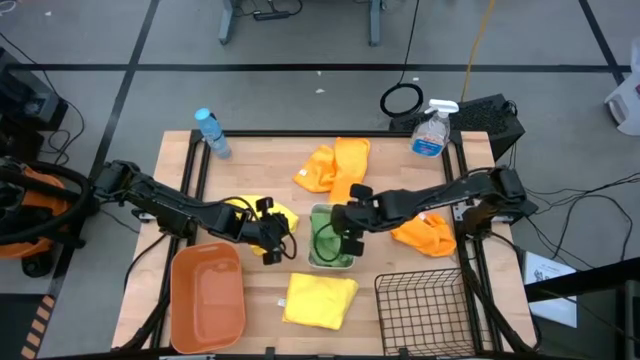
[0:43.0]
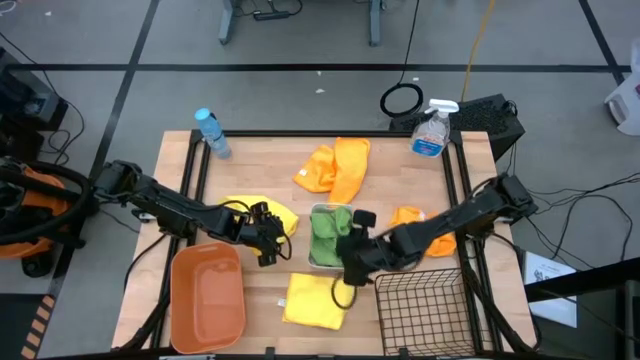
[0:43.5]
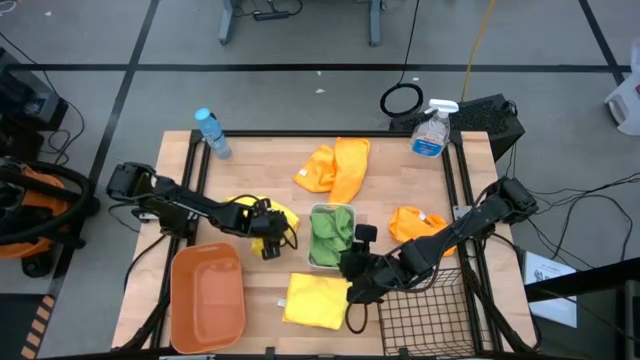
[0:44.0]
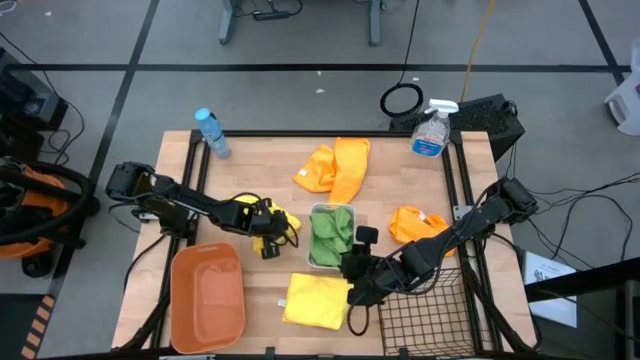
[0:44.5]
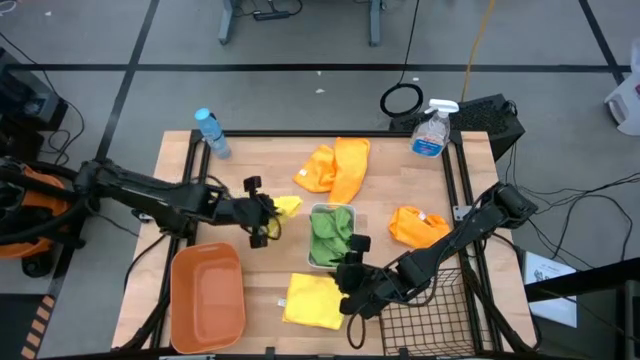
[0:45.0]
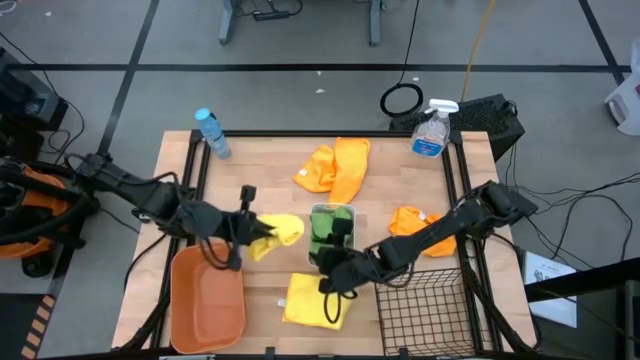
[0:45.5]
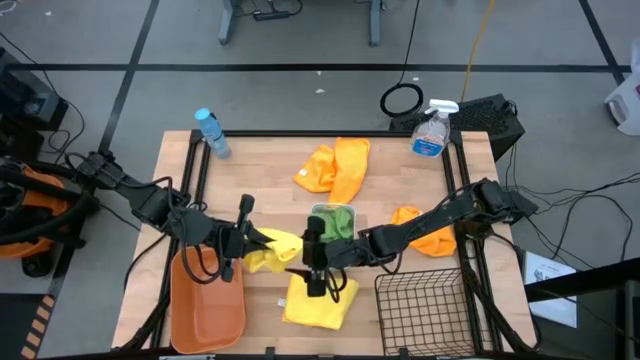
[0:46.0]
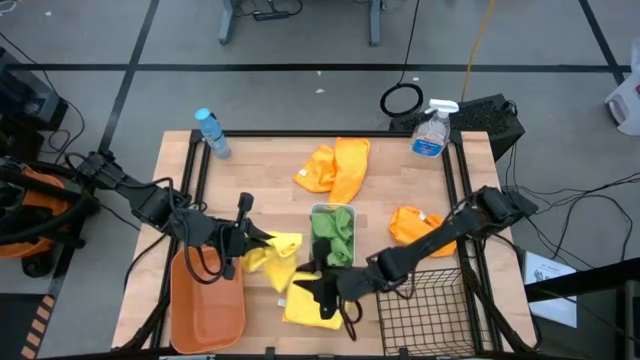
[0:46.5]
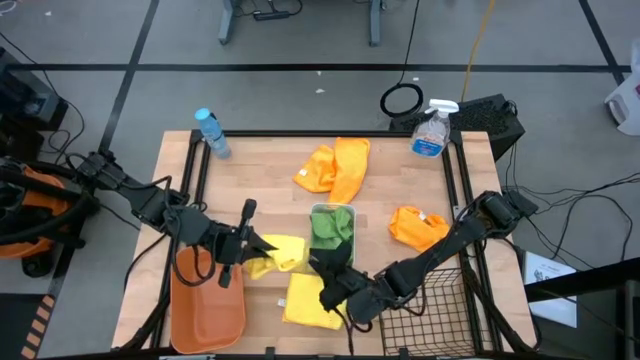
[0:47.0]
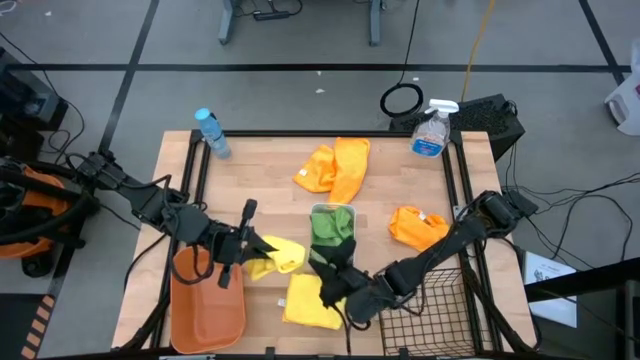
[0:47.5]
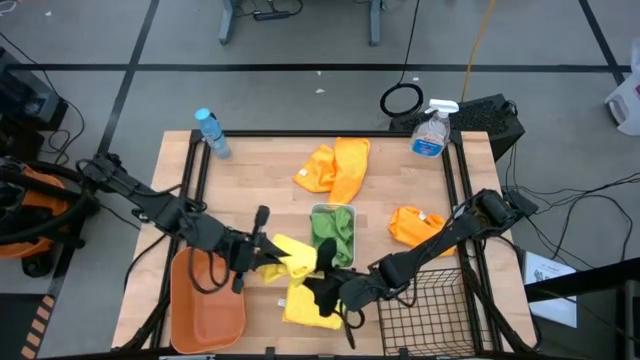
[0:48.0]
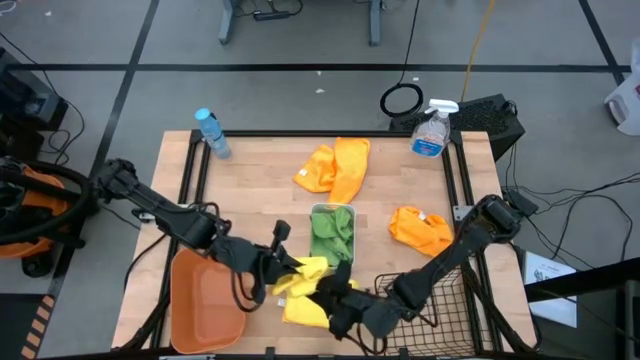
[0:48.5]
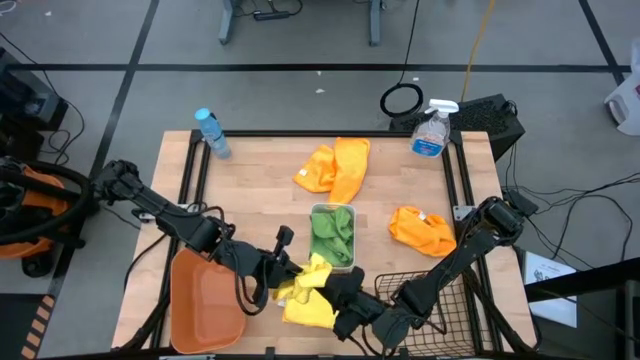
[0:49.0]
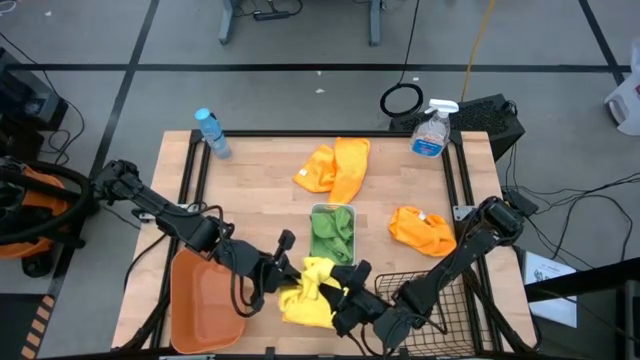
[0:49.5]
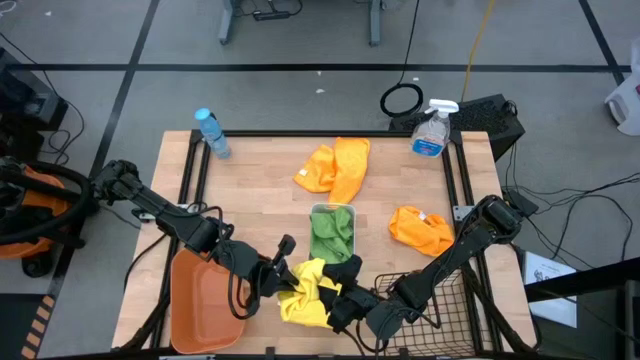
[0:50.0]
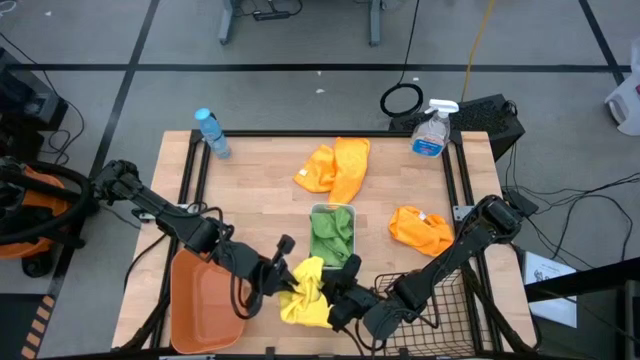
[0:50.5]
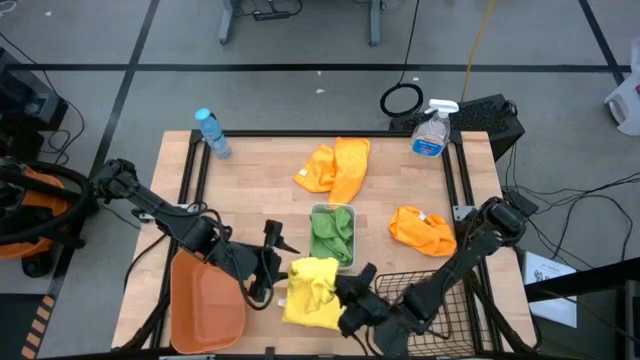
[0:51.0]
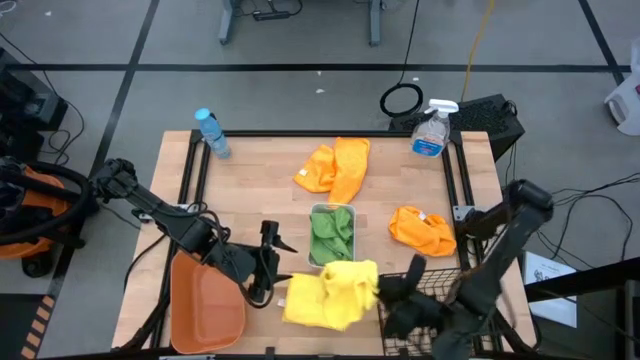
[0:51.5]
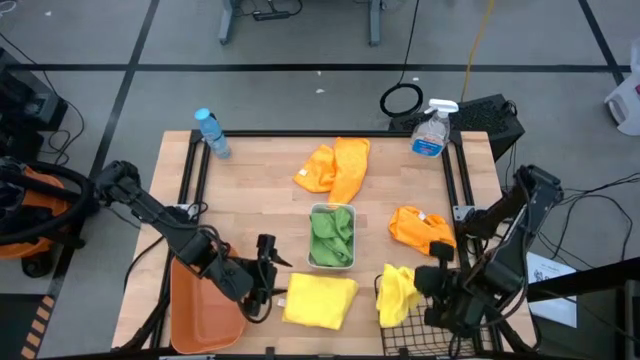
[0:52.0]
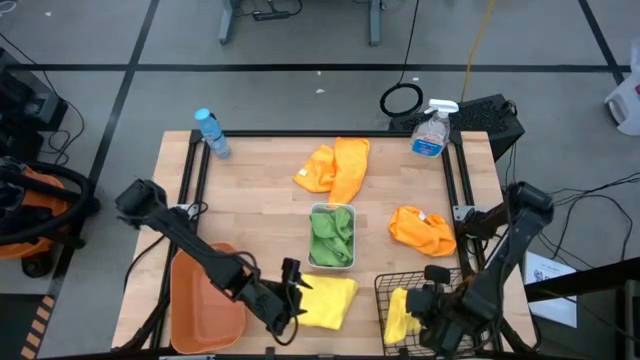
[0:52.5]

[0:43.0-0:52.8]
Task: Sort microfiber towel by color & place in baskets
Put the top yellow microfiber towel into the wire basket

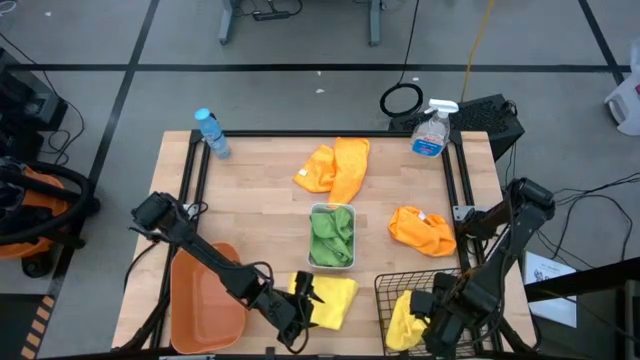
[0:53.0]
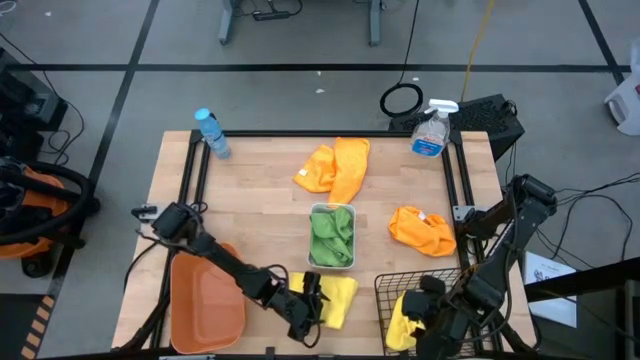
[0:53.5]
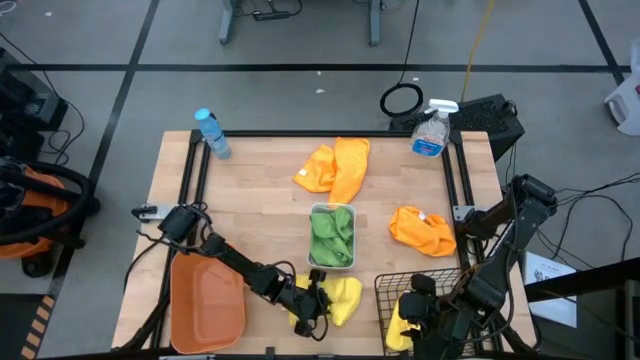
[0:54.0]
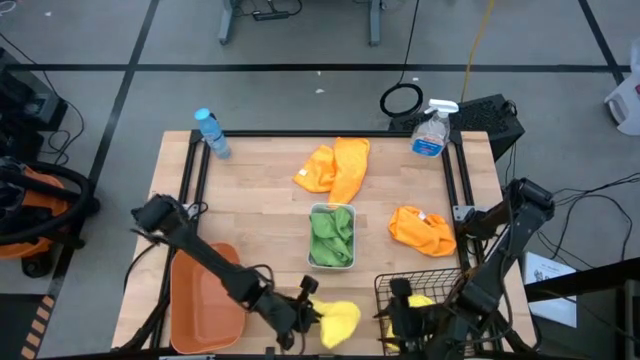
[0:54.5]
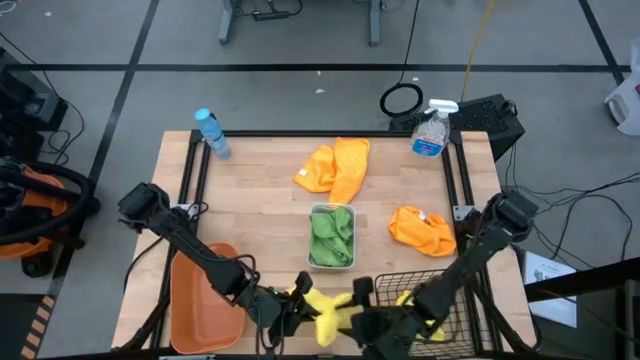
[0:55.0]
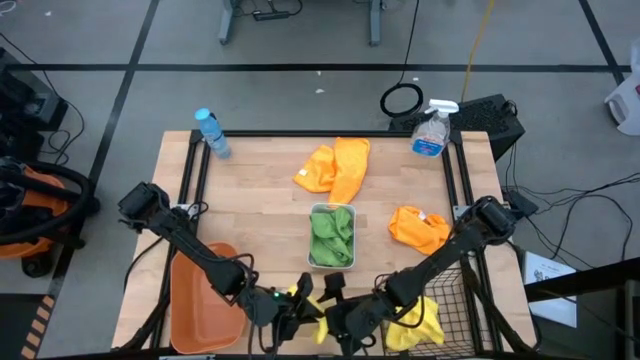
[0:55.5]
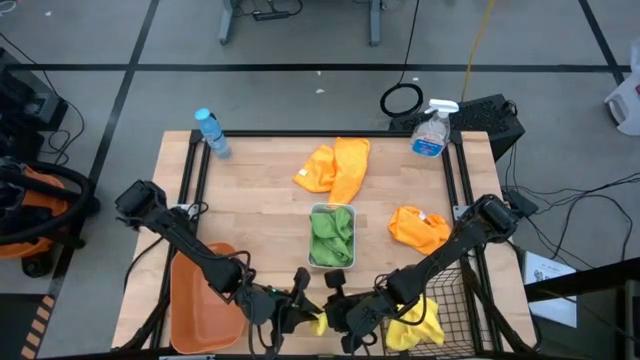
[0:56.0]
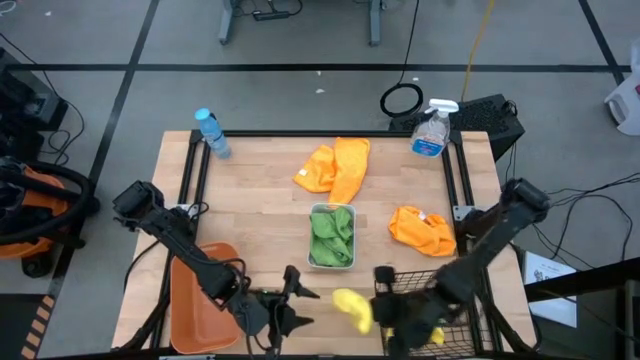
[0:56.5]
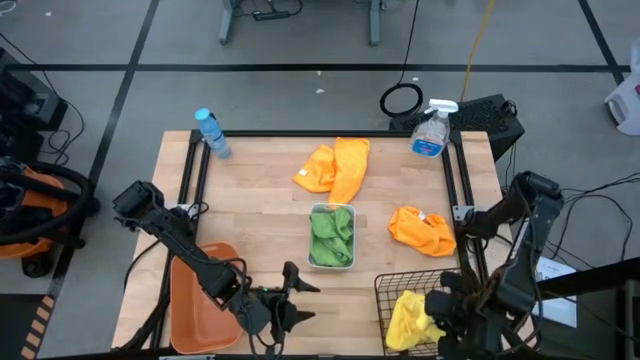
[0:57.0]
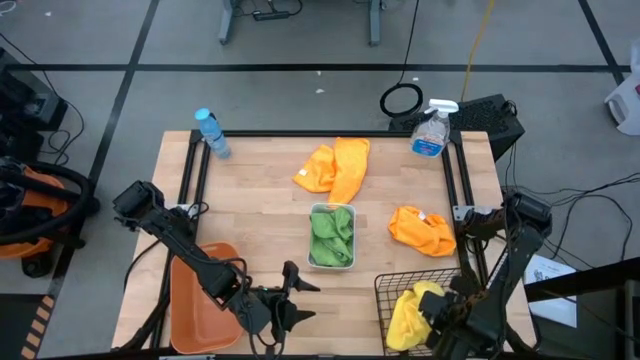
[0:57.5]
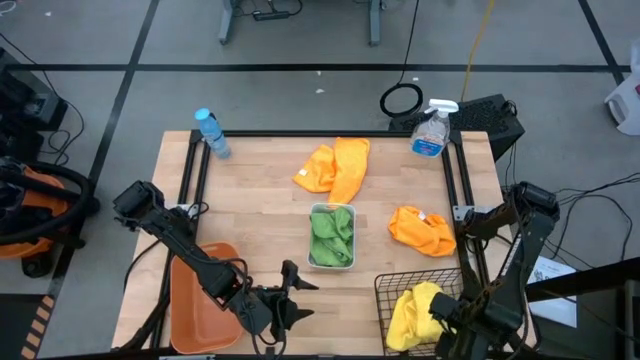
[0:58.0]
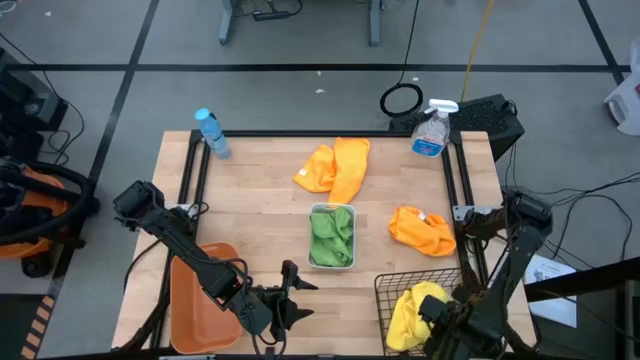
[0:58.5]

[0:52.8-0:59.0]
Put the yellow microfiber towel into the wire basket

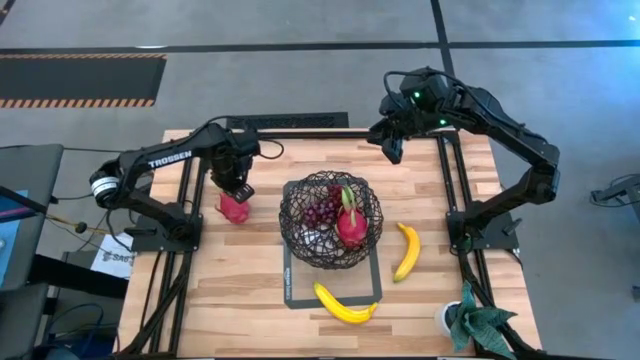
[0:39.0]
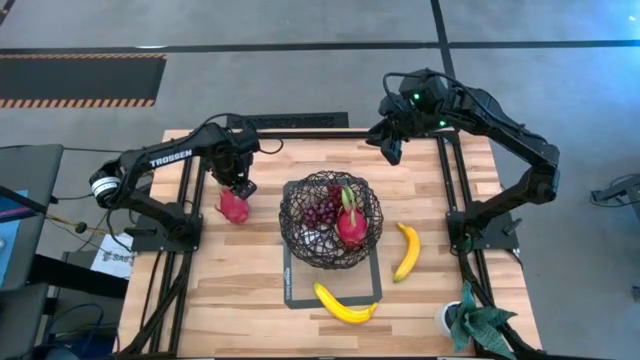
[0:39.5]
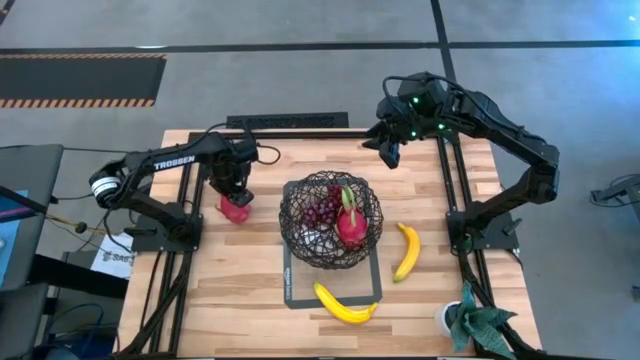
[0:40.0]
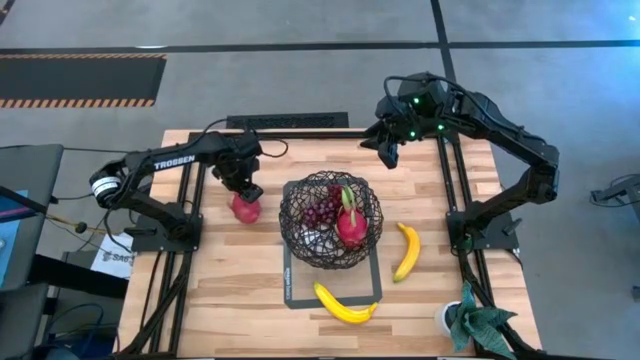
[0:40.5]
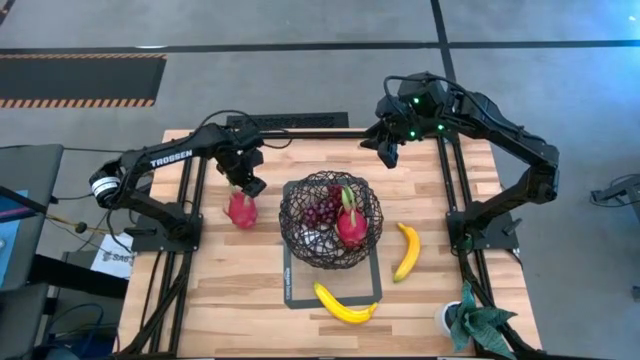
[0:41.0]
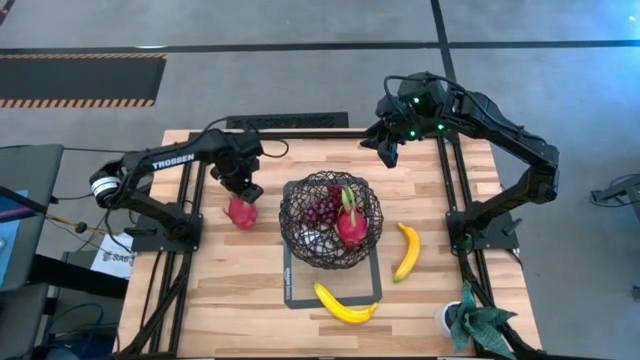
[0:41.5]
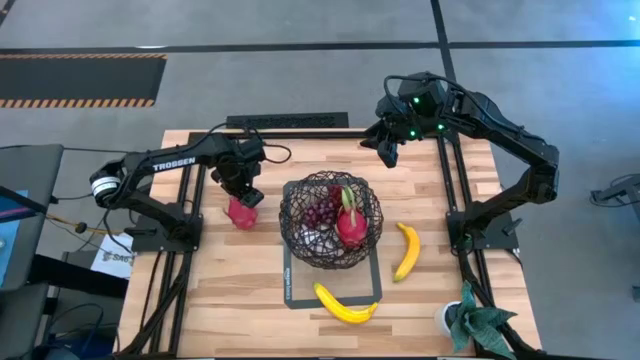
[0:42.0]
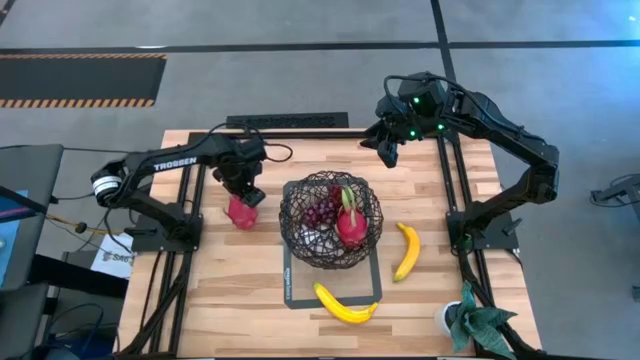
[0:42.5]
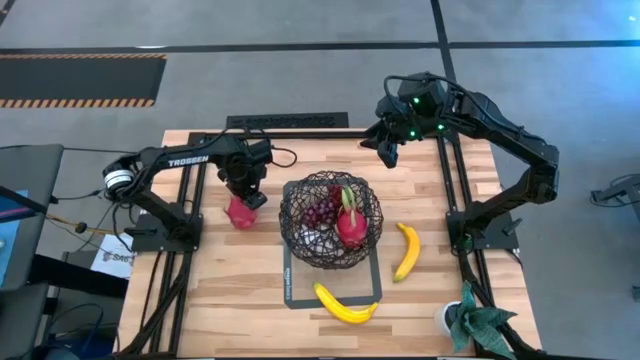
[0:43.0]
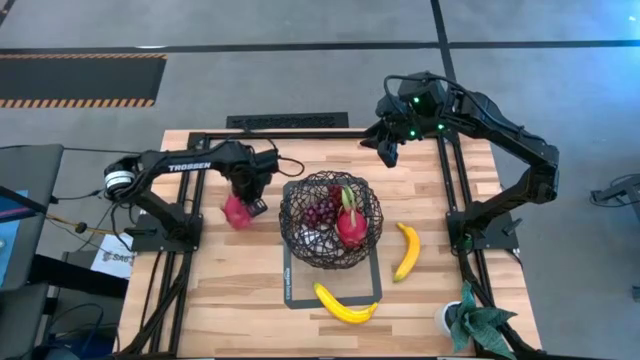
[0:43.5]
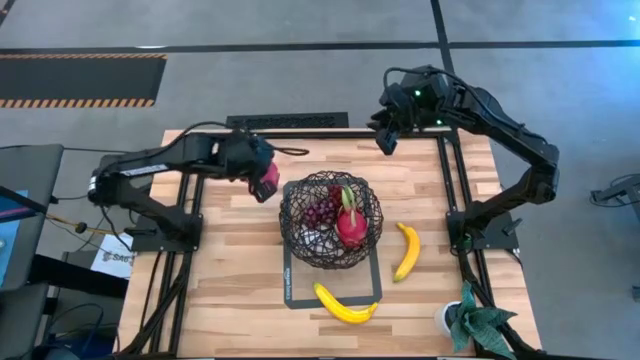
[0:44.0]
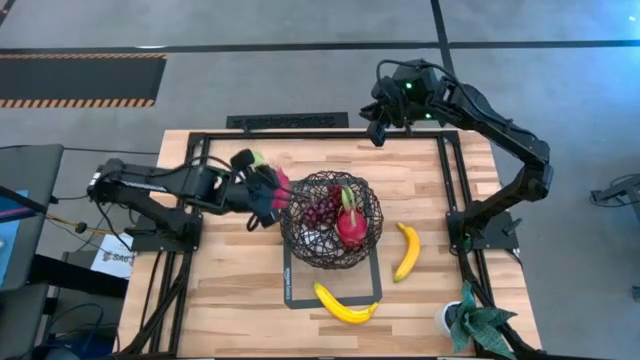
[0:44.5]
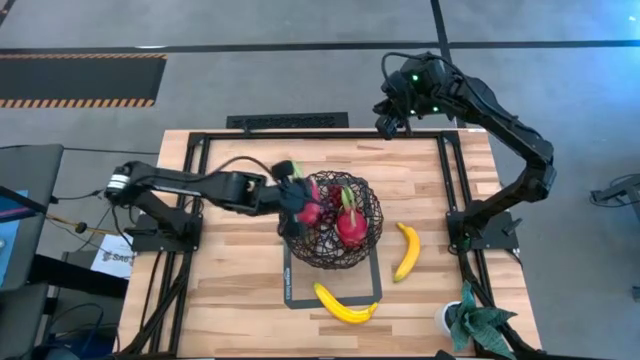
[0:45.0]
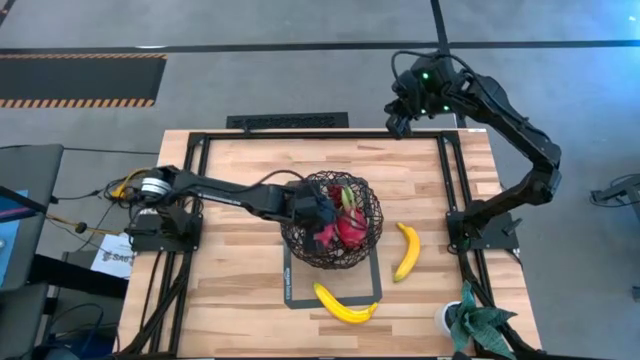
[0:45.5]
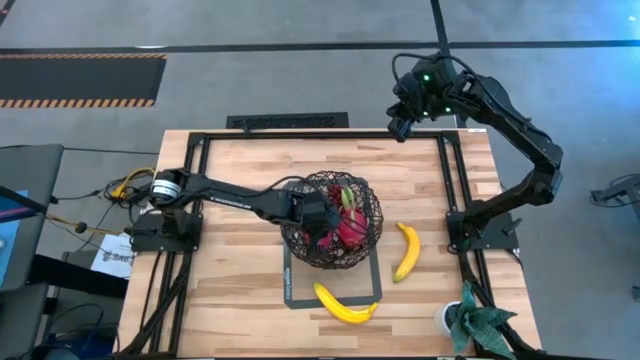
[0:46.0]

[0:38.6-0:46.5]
Task: Build produce basket
Put the red dragon fruit into the black wire basket
